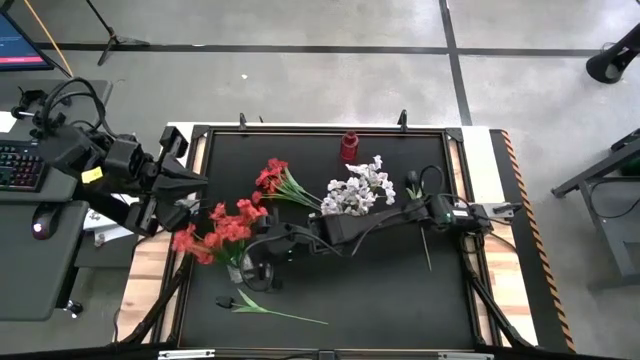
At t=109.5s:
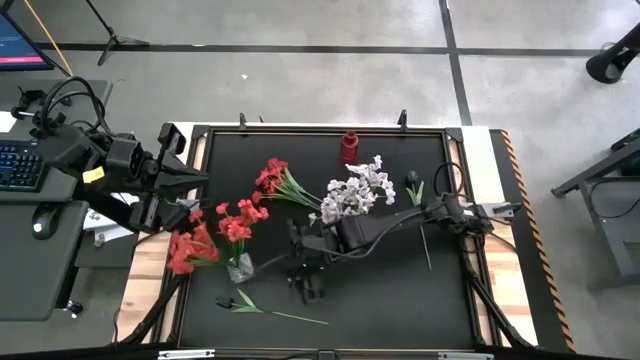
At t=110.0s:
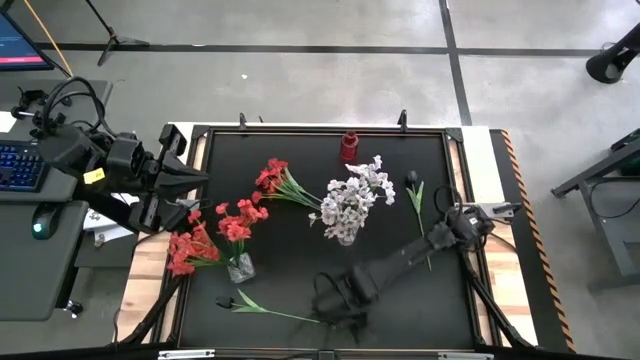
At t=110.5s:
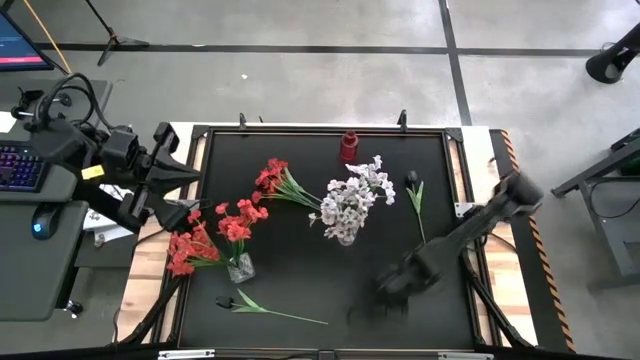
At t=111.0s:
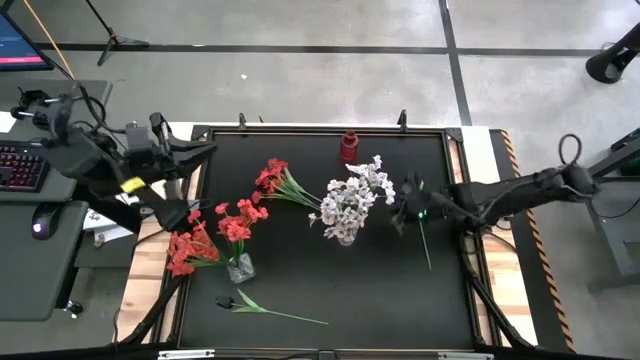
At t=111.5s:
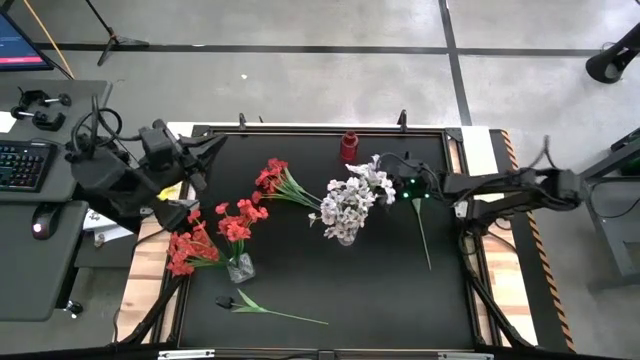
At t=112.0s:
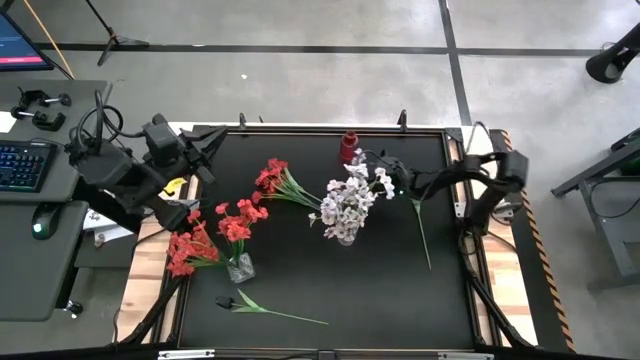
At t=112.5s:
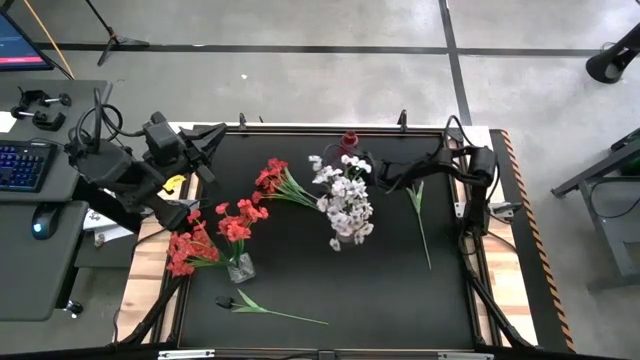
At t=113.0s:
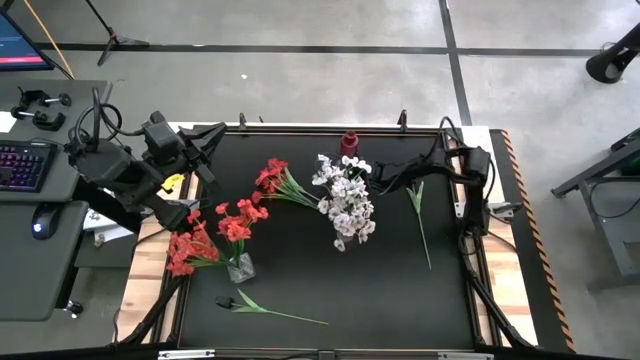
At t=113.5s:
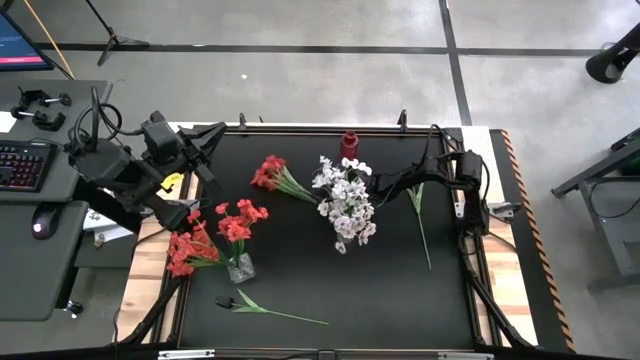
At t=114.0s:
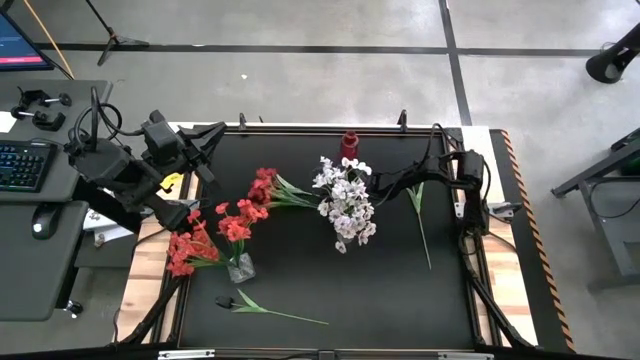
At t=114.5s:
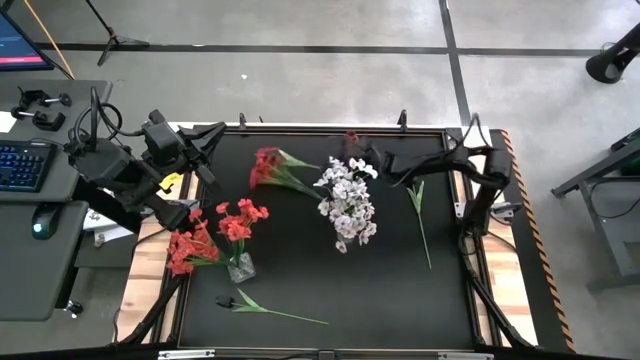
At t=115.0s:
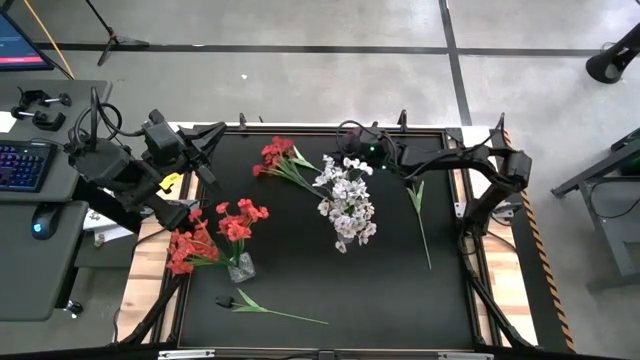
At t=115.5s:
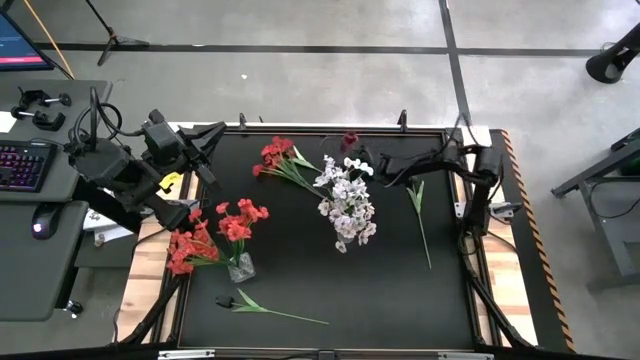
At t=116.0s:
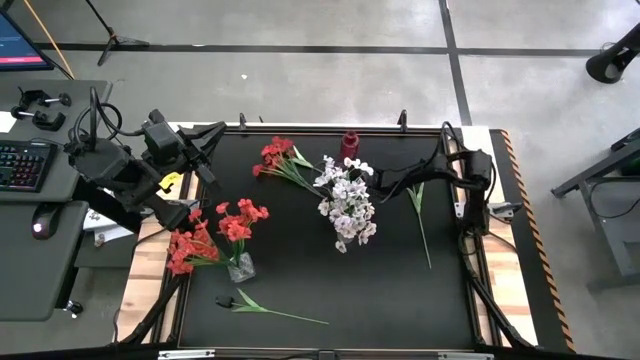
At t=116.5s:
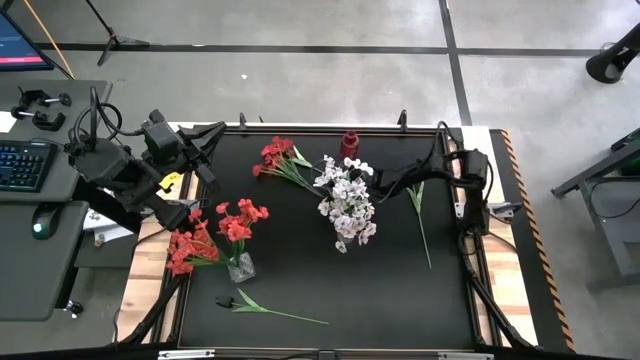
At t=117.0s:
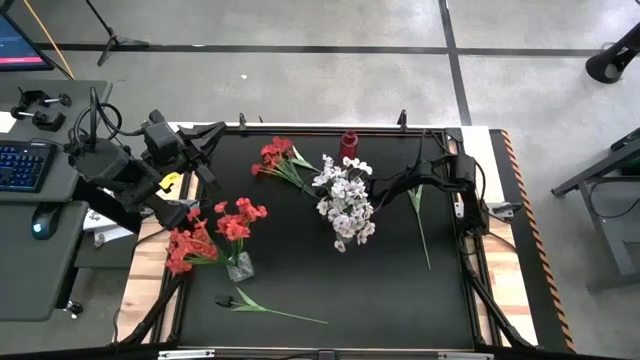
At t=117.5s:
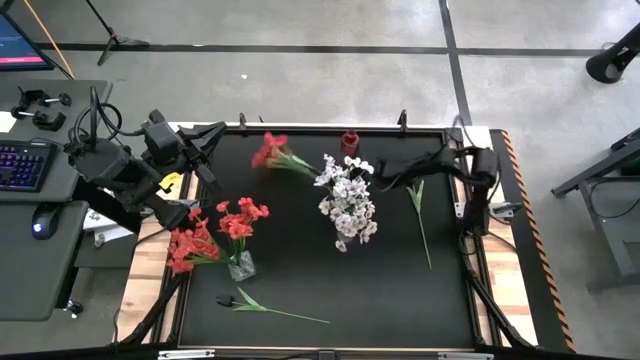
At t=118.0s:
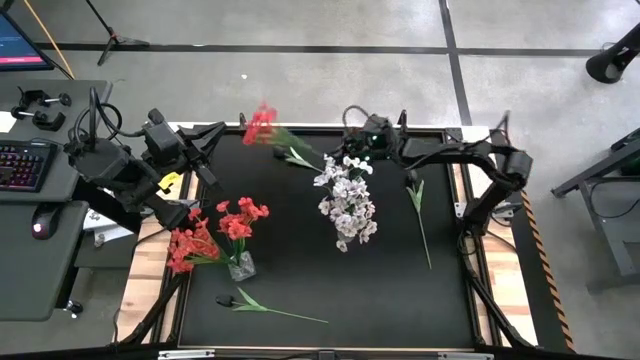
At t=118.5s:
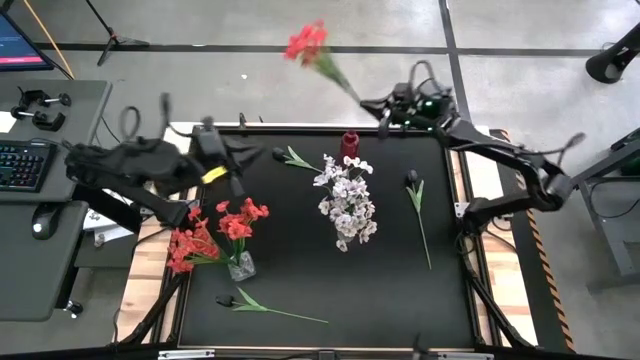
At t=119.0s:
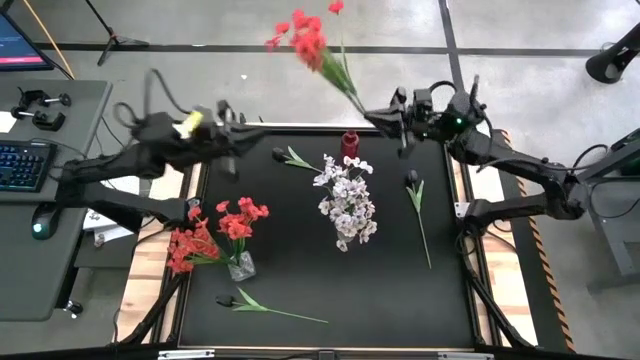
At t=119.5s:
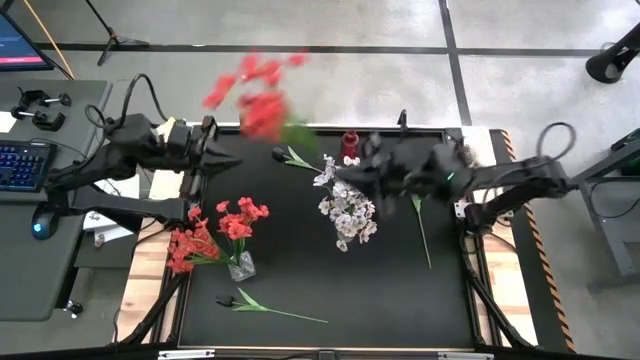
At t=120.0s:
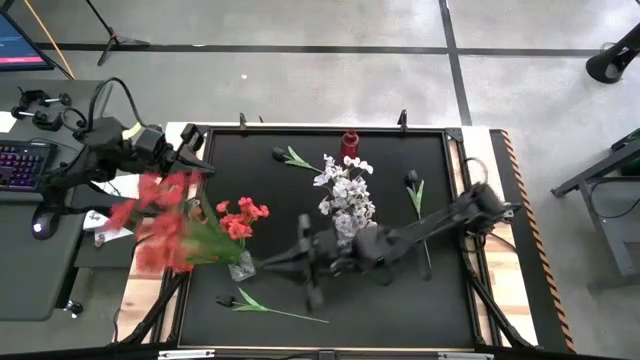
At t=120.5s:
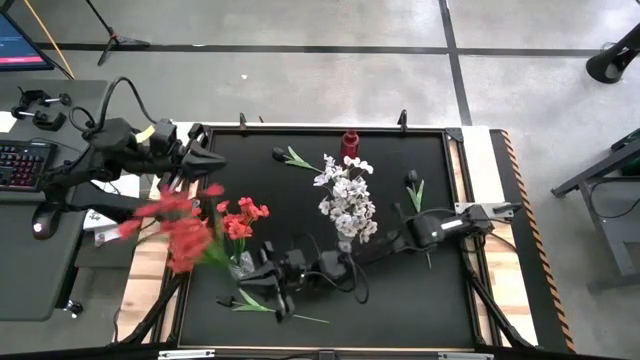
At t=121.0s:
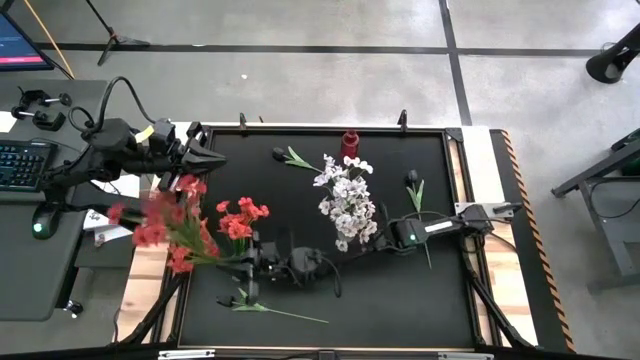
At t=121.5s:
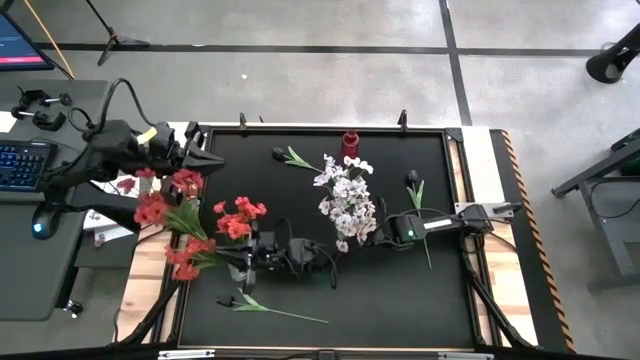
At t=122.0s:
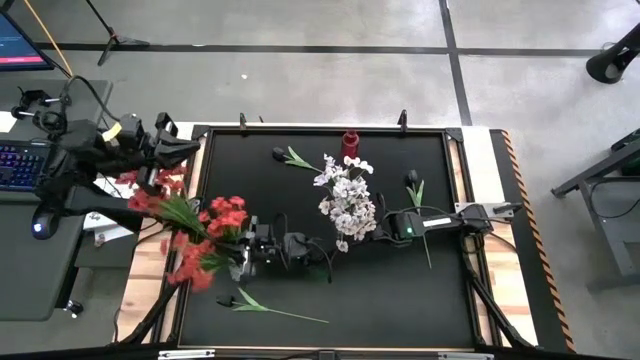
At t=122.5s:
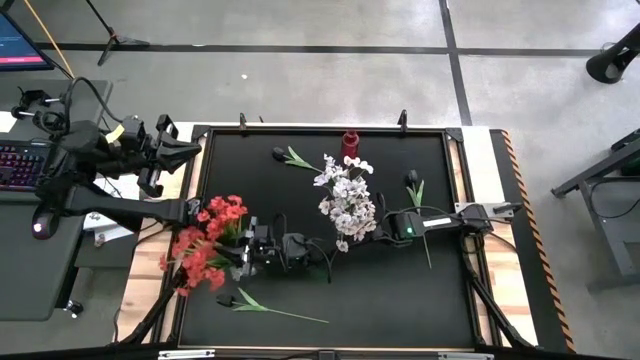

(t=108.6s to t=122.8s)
Task: Sort flowers into vase by color
Put the red flowers into the left transparent vase

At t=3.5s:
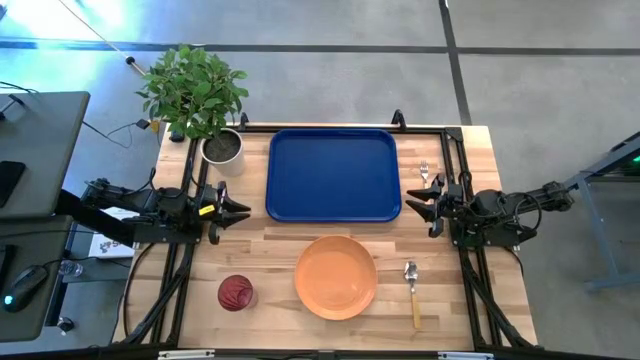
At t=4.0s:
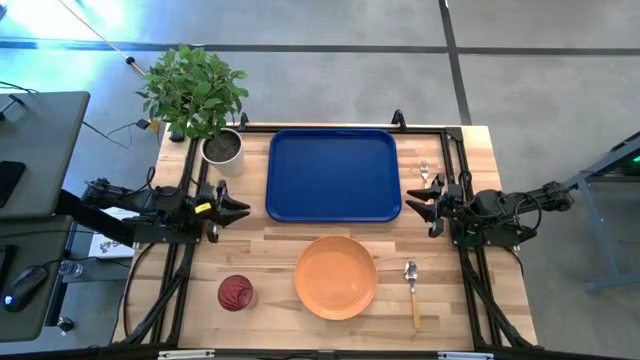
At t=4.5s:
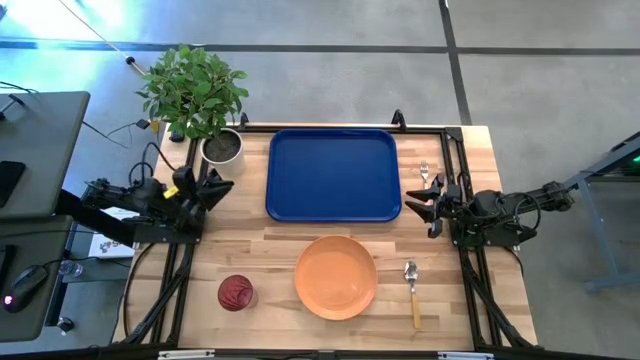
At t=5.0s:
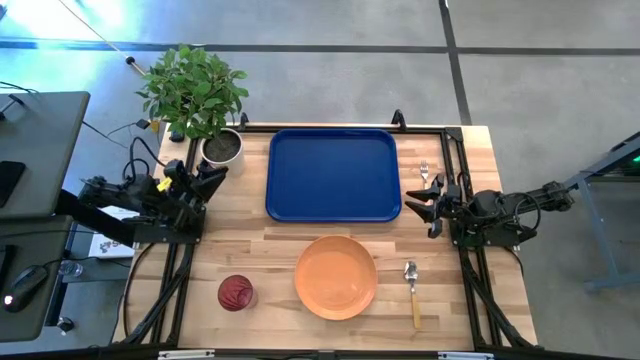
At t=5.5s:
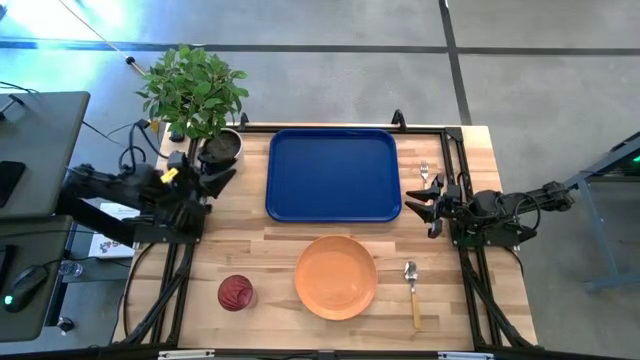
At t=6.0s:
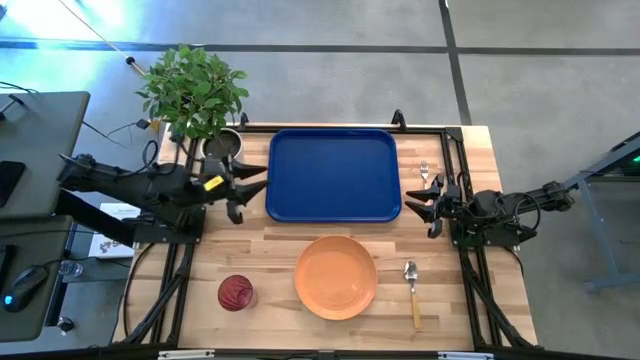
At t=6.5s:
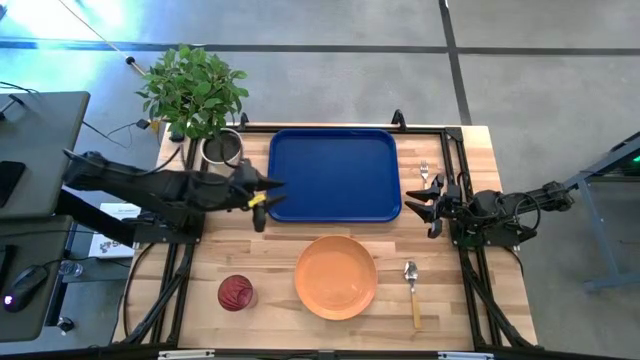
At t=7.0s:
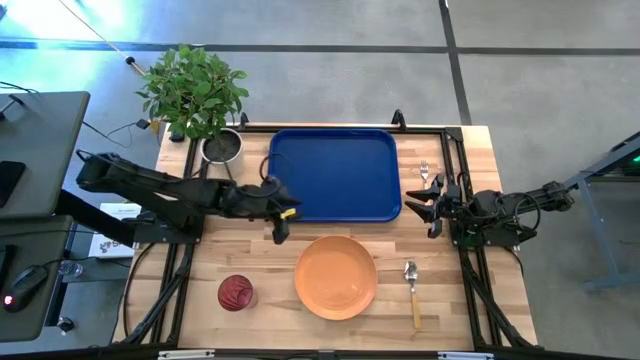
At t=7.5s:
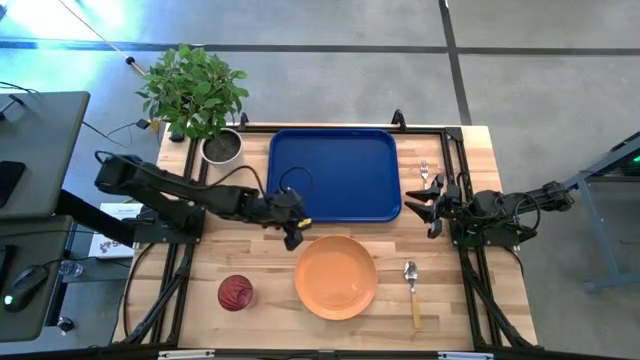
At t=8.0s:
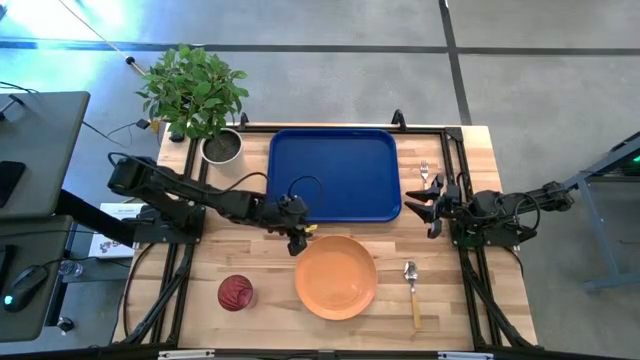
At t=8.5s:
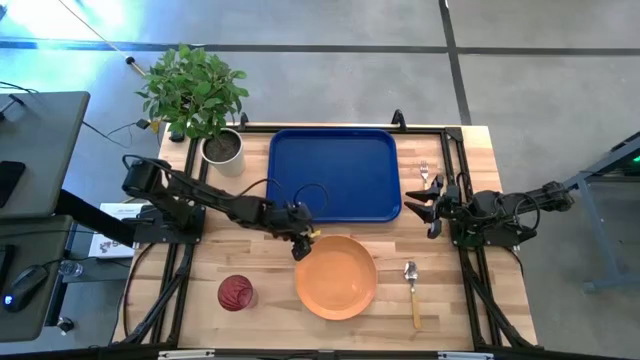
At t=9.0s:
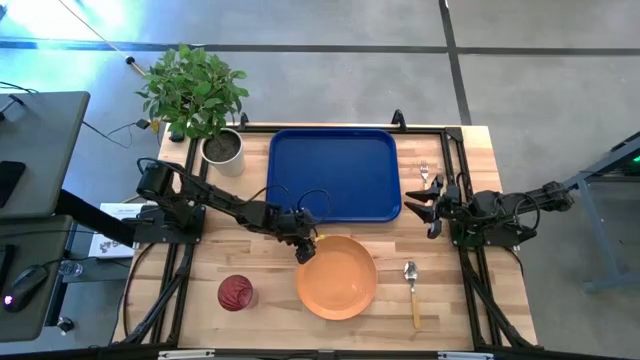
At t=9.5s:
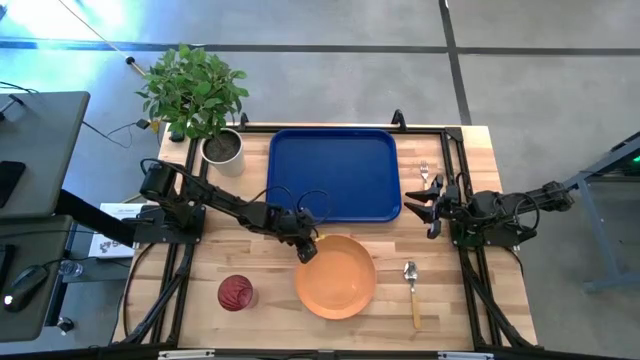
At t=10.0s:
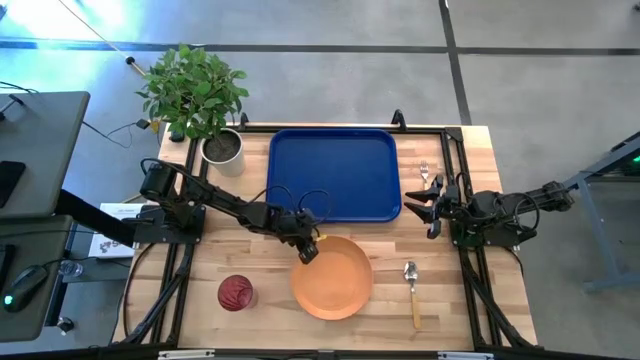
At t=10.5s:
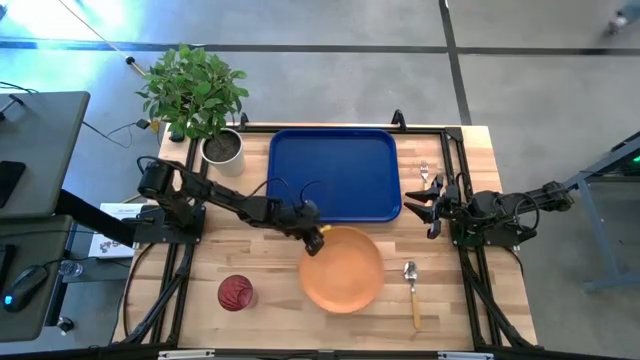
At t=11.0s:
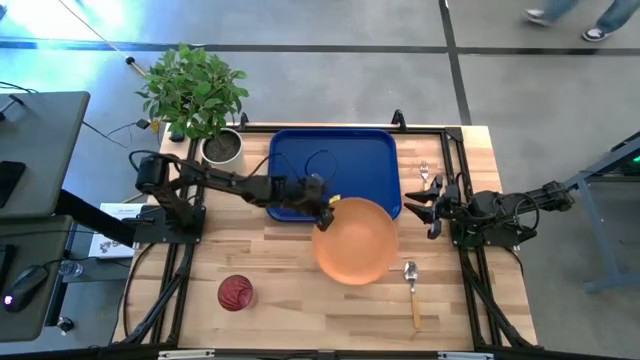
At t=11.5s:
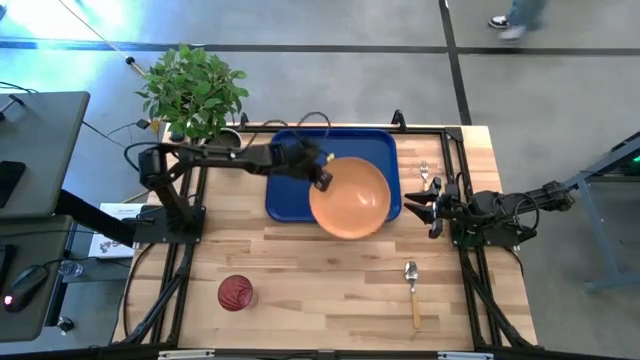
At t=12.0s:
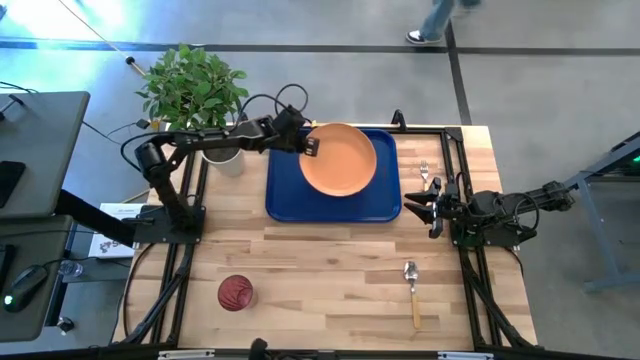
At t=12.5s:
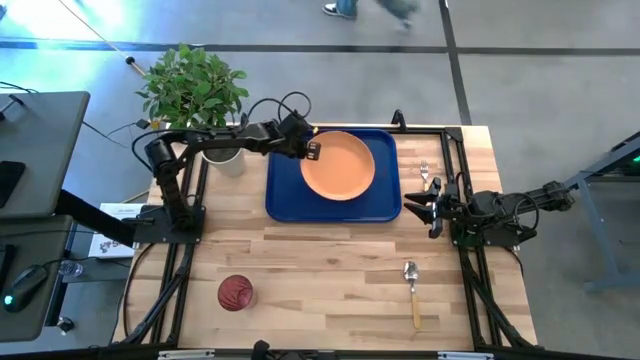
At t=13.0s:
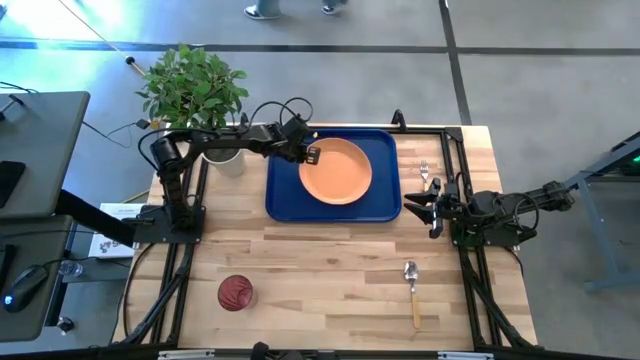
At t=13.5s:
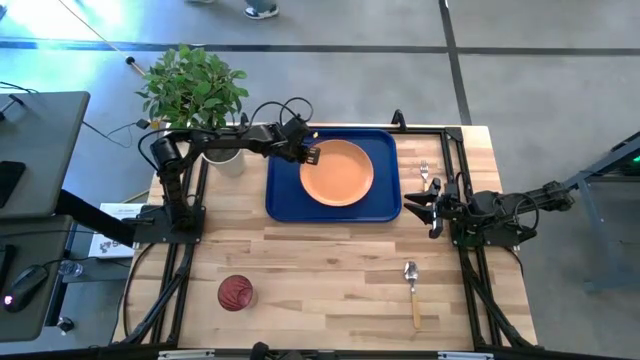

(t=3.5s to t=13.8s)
Task: Pick and place plate/cup/fork/spoon on tray
Put the orange plate on the blue tray
